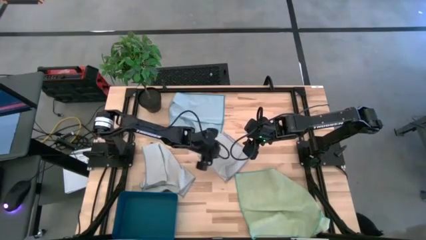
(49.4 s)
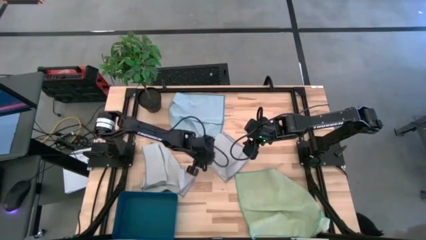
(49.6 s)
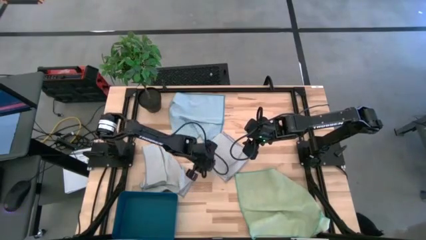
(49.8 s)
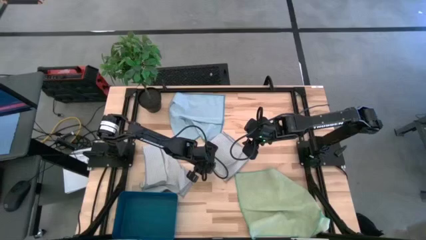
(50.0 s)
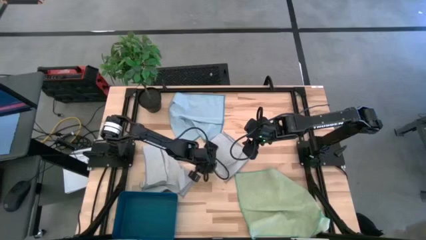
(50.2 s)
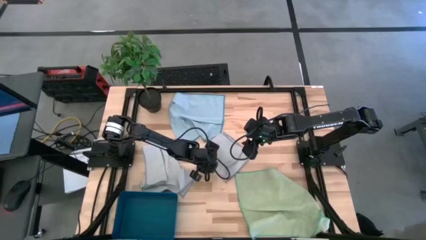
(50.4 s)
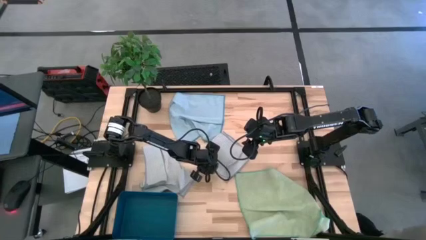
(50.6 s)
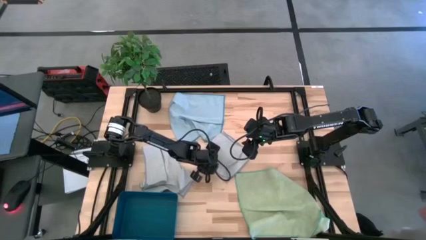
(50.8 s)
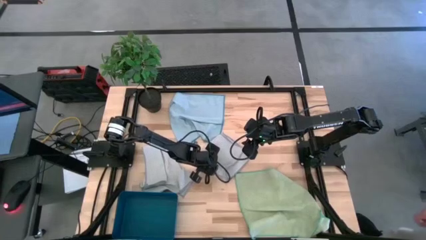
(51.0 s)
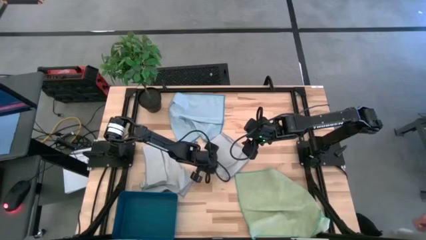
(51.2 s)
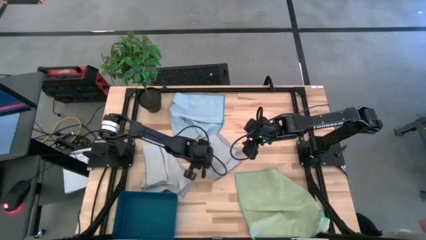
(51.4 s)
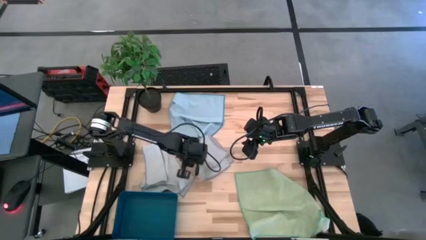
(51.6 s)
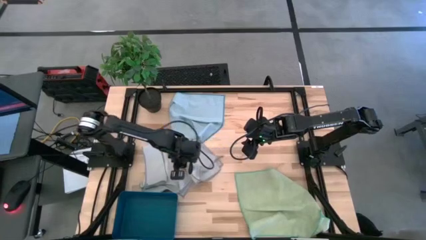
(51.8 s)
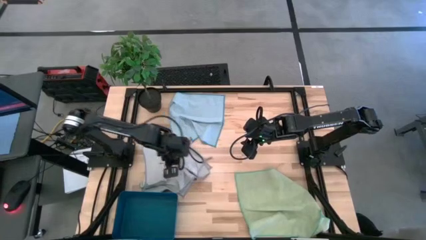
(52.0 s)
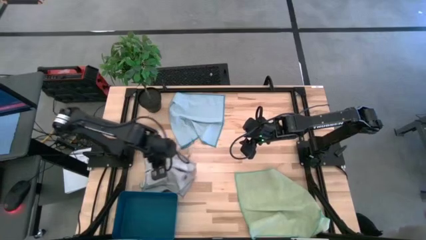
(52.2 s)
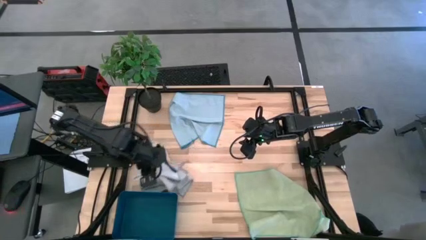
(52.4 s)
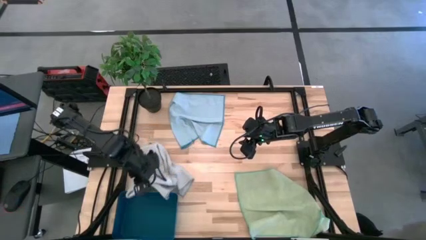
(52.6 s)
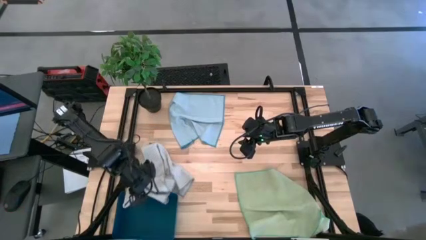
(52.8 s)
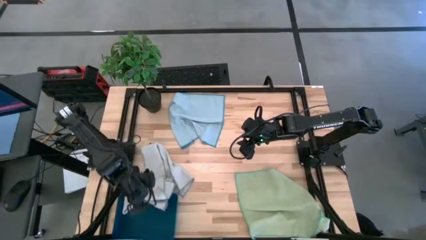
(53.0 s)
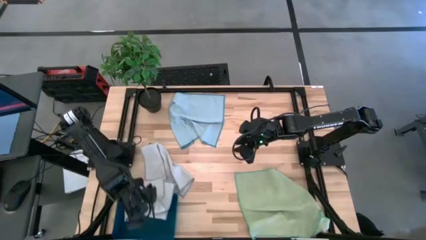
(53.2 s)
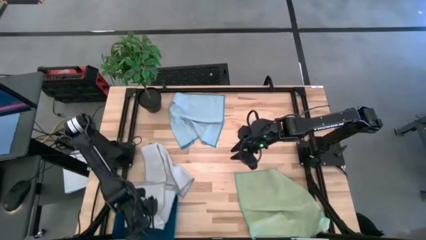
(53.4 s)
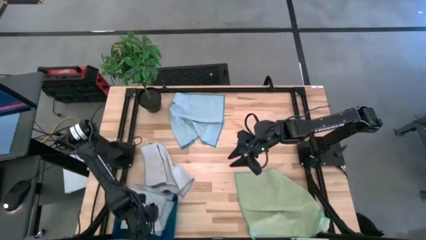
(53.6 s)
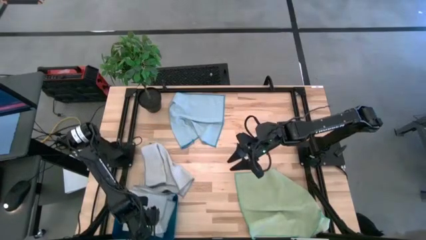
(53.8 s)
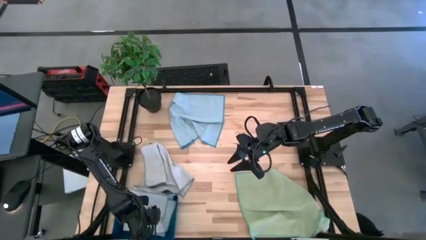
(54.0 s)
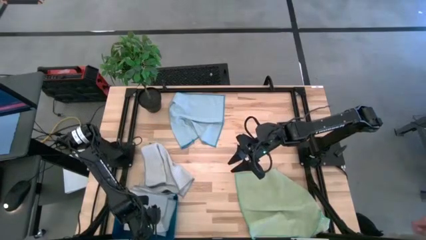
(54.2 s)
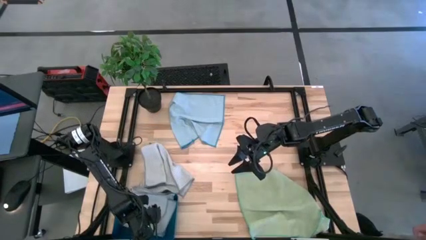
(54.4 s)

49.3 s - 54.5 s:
Task: Fold microfiber towels
Put the gray microfiber towel into the blue bin

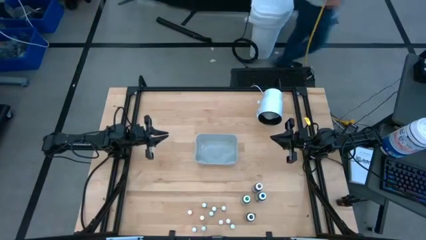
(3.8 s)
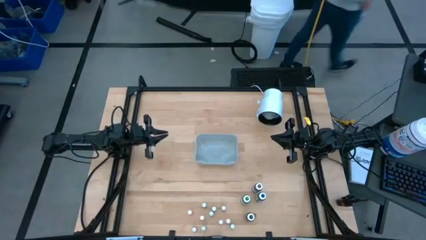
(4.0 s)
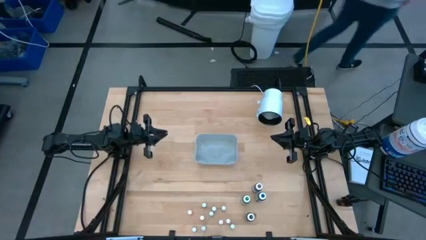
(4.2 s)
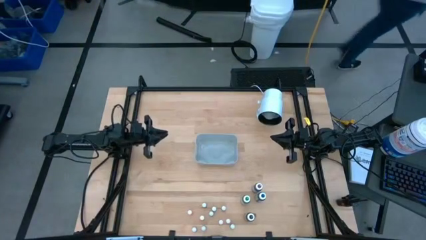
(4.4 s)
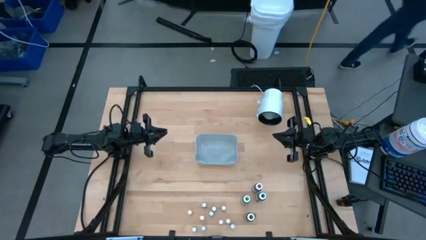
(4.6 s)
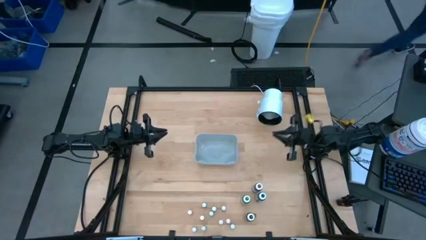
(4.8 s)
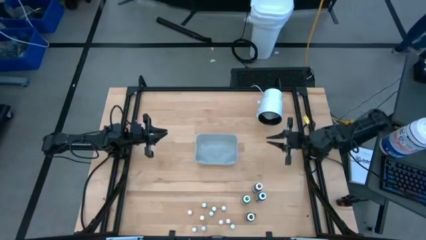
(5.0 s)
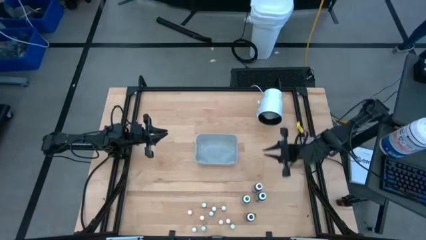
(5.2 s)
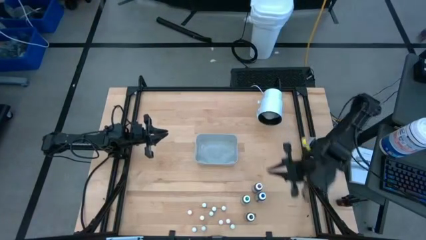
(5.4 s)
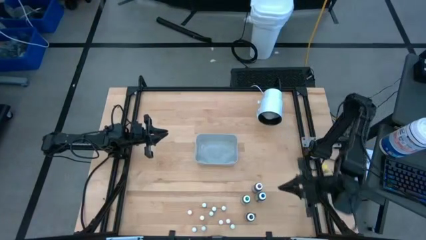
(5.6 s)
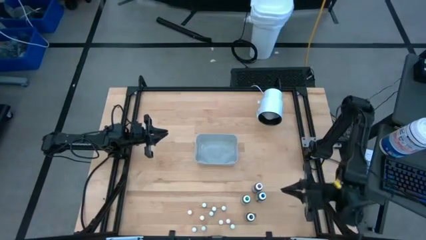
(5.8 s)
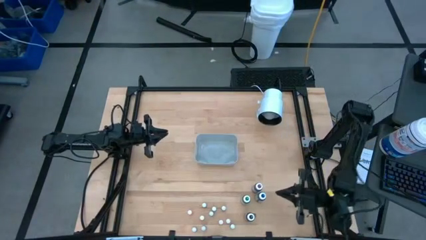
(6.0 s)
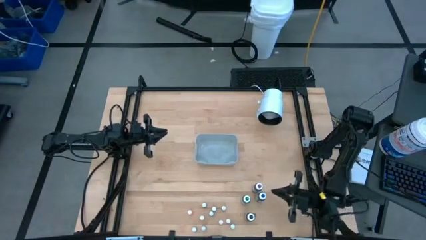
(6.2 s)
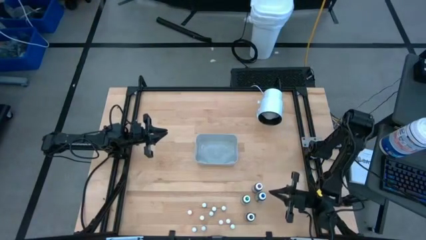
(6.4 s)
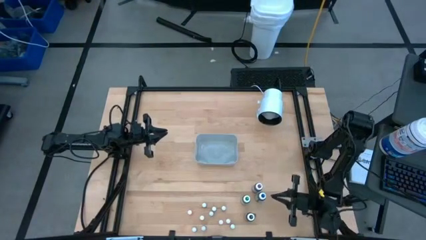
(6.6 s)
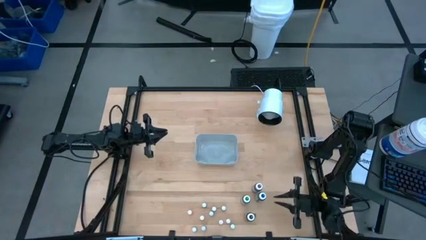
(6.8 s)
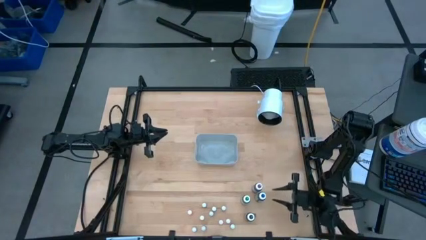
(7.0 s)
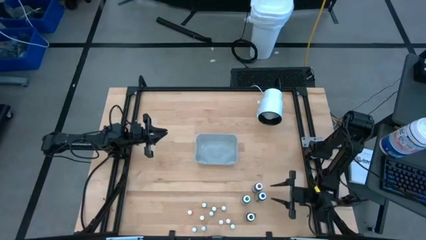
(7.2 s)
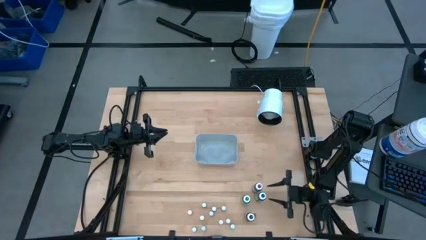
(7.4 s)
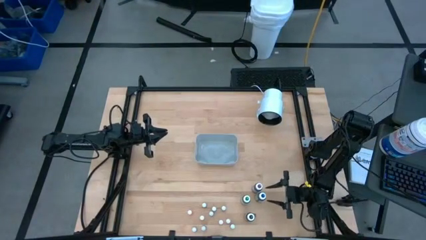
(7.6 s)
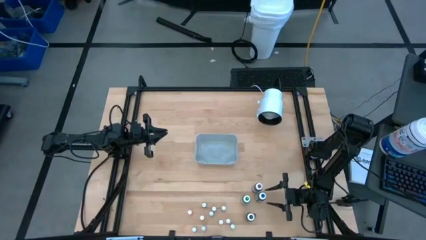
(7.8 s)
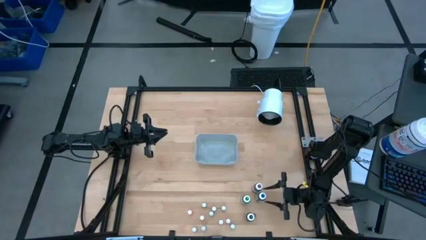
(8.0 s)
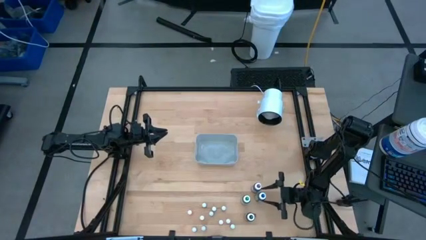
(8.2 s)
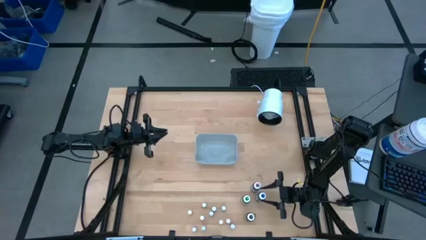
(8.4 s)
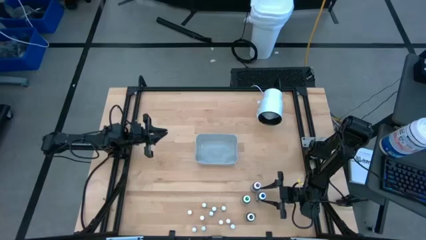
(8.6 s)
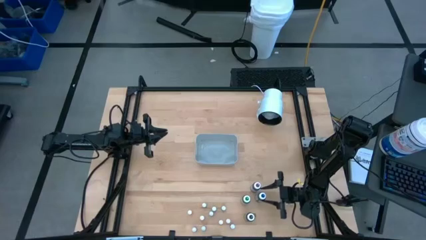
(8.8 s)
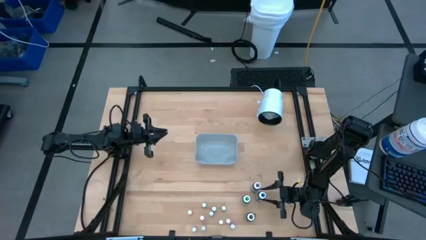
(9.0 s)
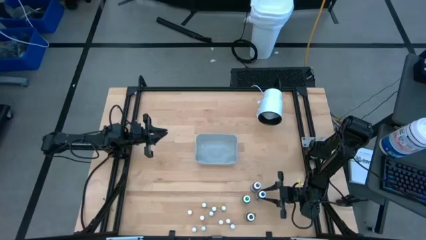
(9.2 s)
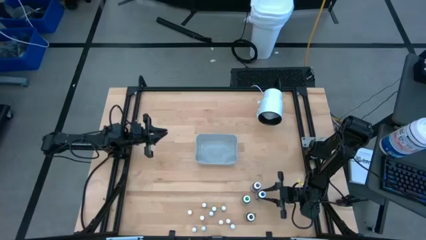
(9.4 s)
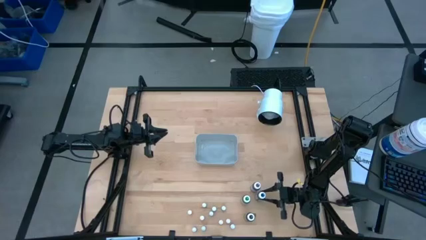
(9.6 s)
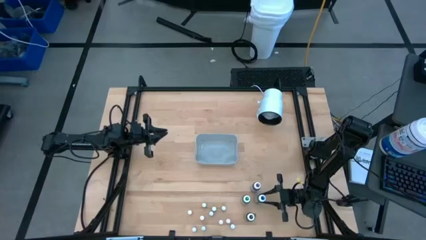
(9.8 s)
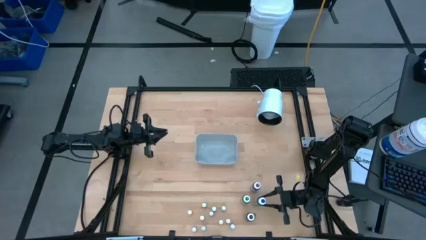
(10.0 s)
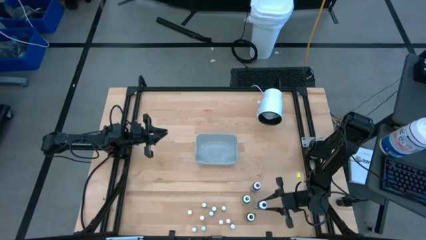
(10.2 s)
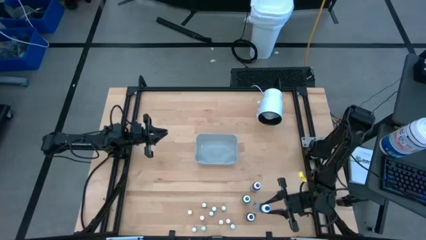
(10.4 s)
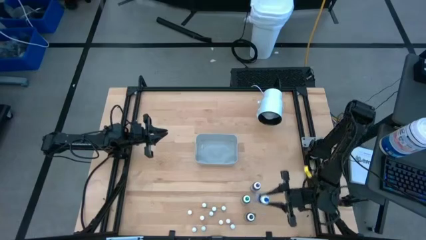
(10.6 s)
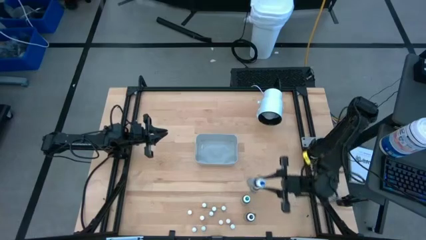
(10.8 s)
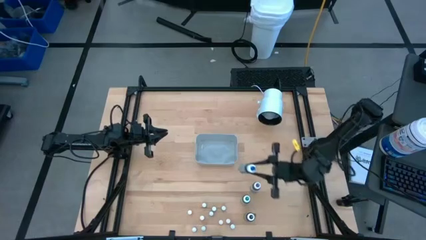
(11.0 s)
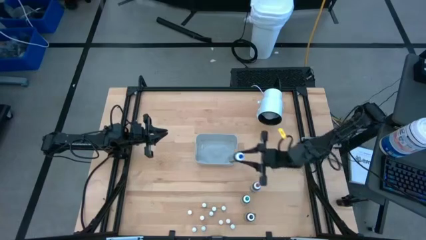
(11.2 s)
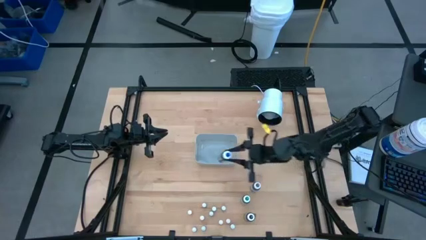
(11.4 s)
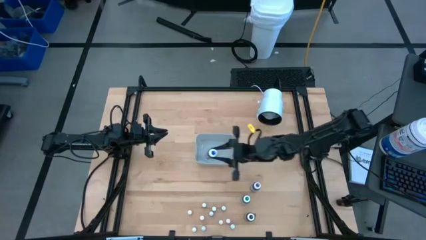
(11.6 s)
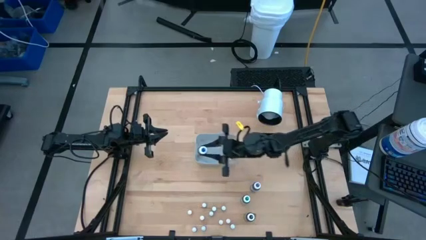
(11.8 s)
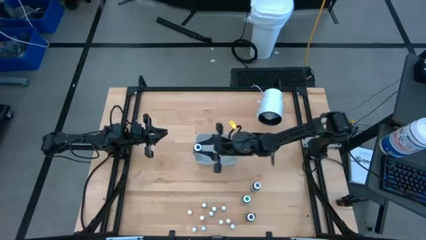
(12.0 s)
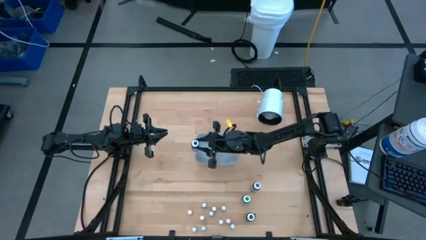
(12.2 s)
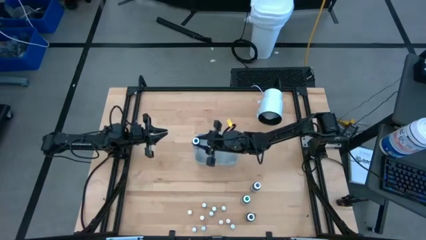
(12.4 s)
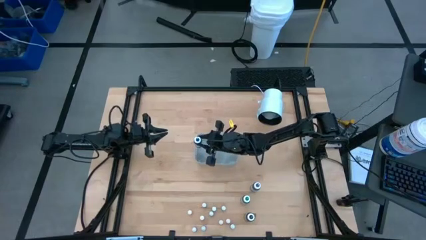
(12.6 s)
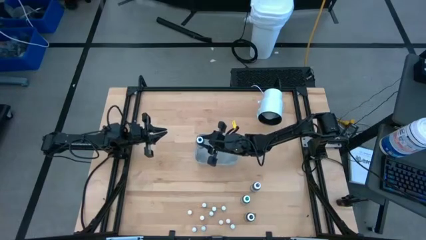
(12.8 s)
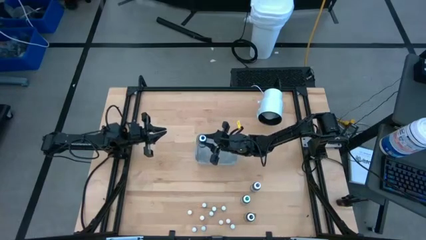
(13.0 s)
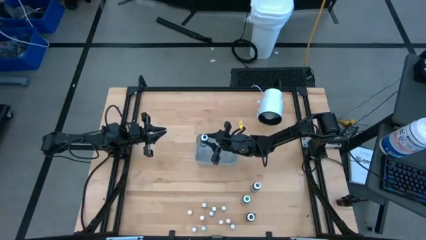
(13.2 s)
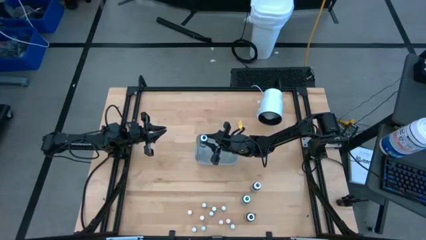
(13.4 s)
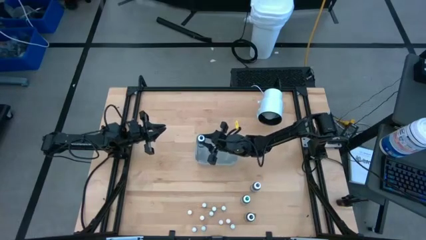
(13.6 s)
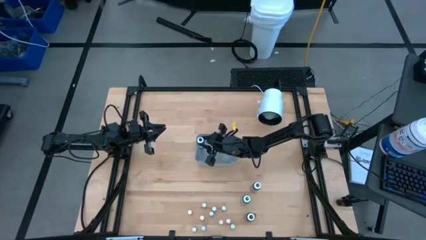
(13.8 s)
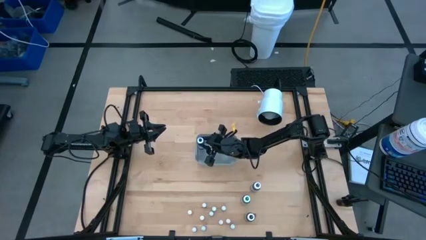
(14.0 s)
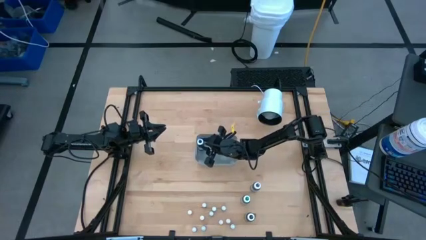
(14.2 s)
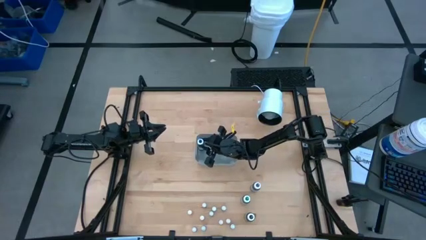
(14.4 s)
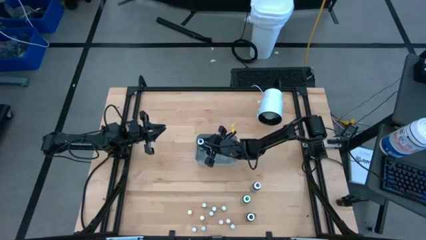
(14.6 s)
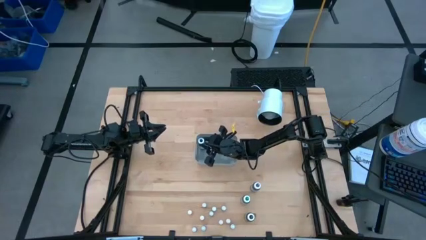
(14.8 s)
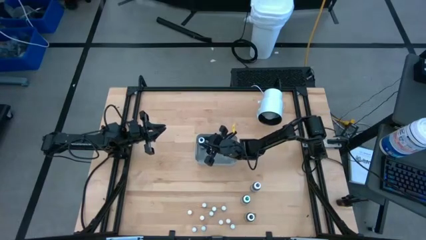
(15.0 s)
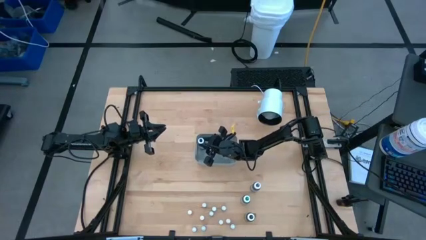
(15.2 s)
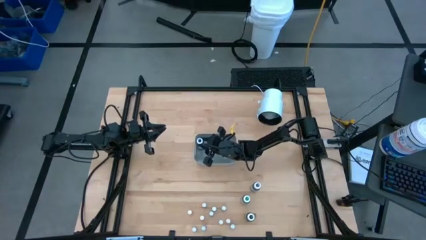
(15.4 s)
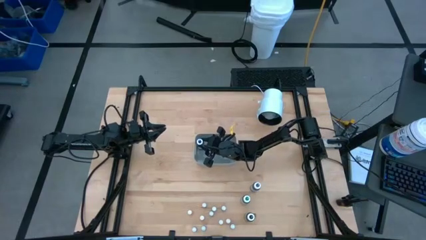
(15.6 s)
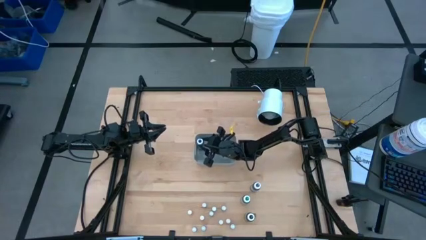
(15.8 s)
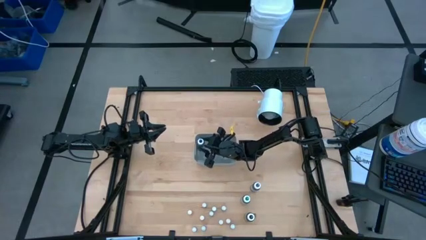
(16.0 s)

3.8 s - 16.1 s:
Task: Pick & Place food coloring
Put the big blue food coloring bottle into the gray bin
